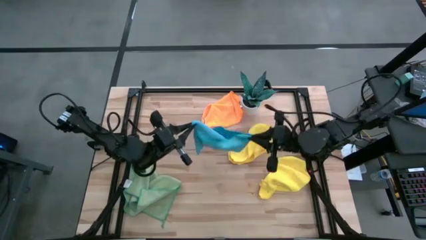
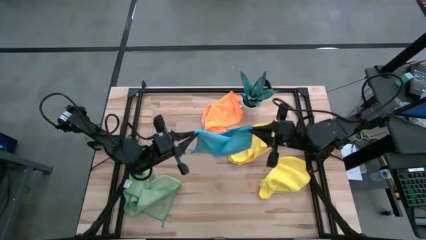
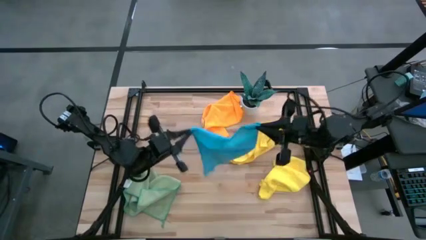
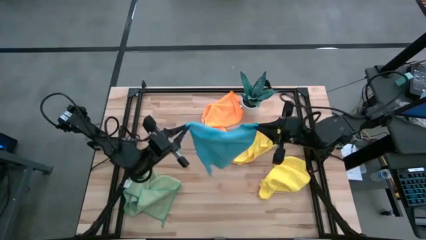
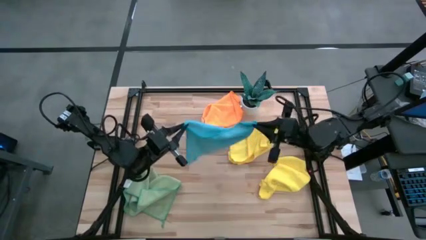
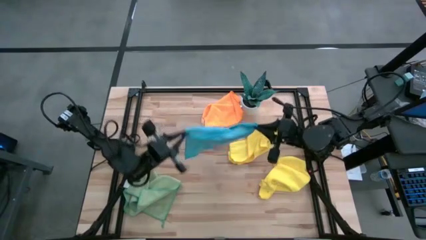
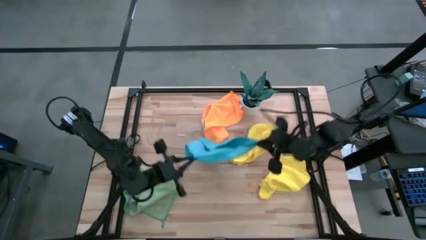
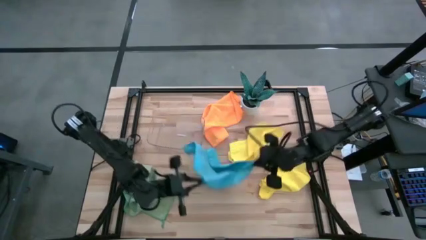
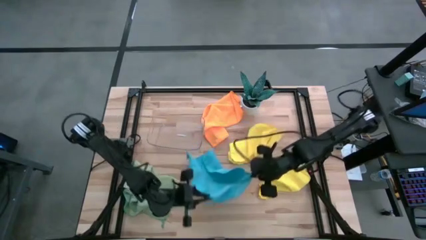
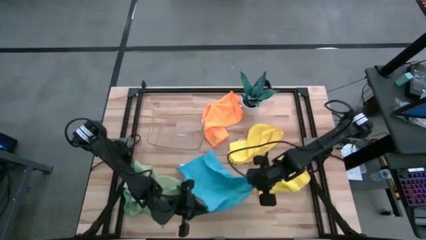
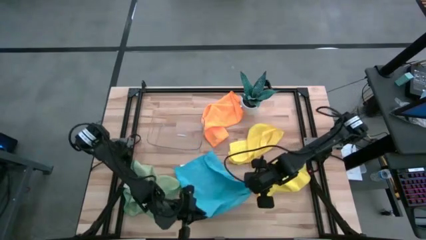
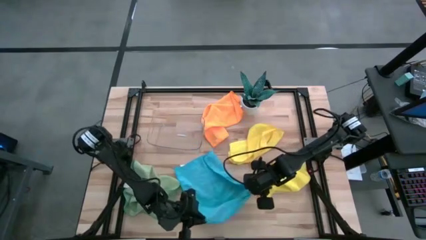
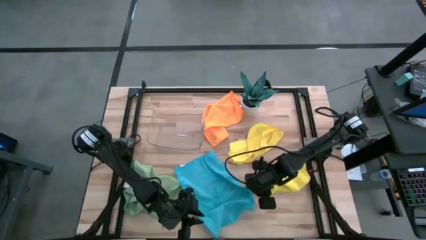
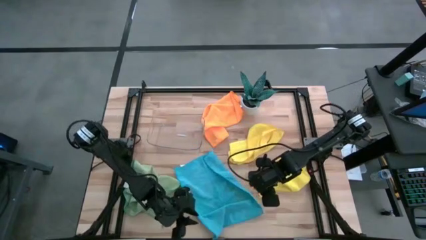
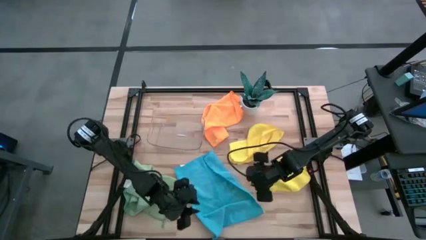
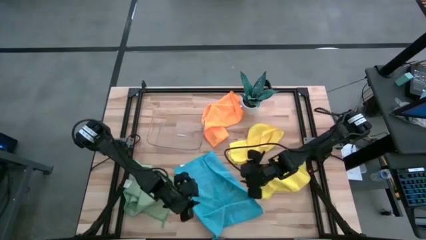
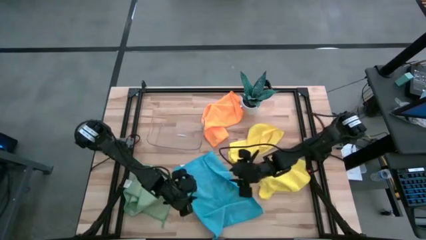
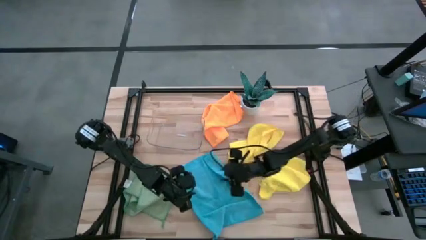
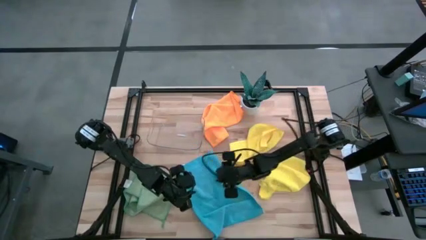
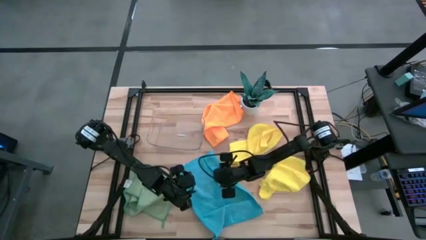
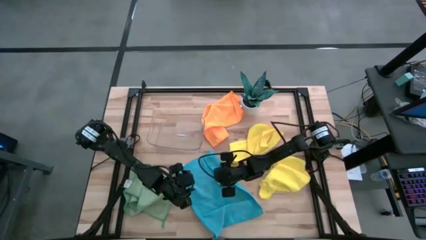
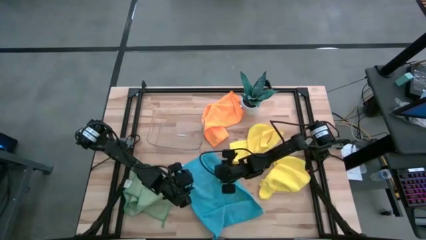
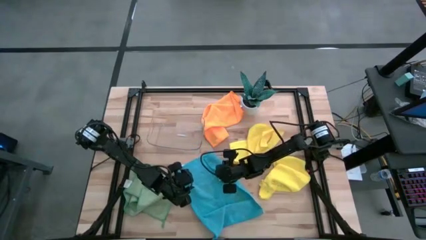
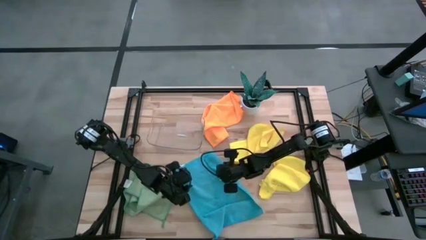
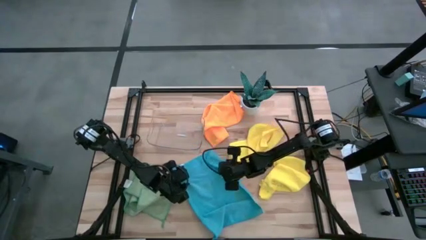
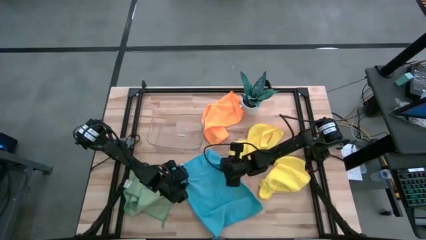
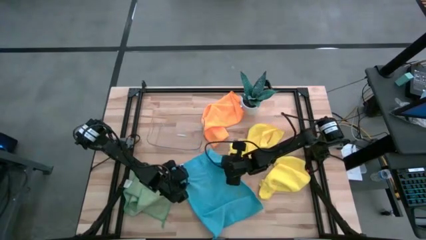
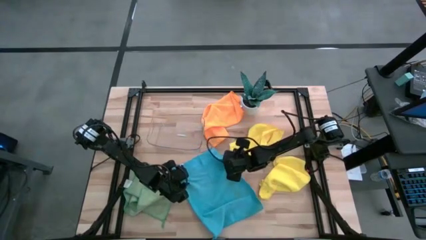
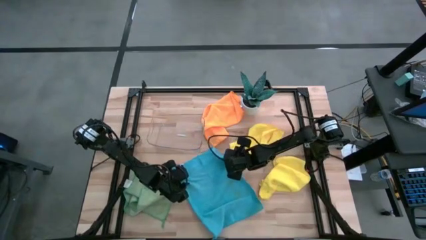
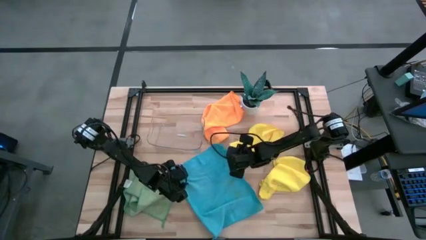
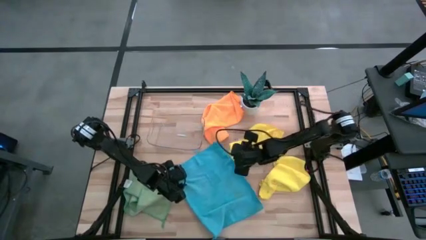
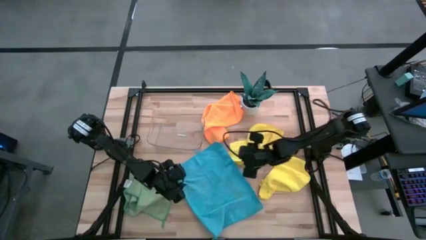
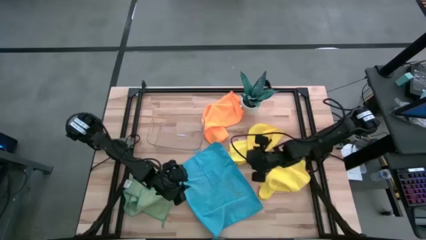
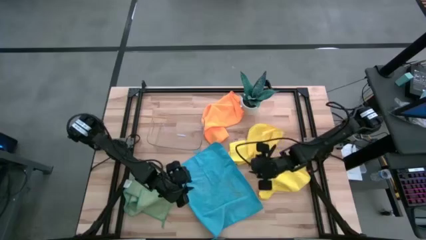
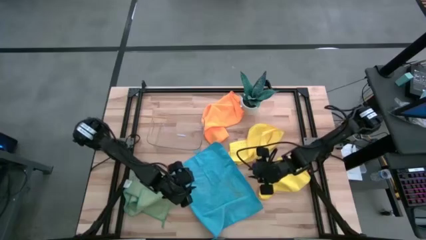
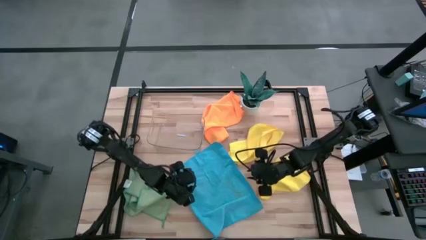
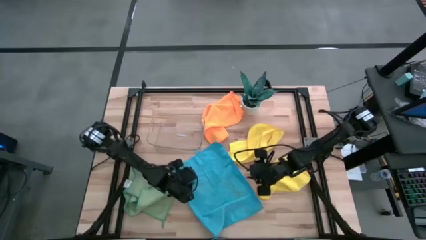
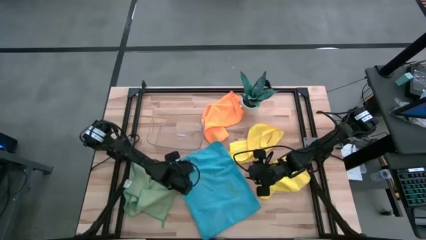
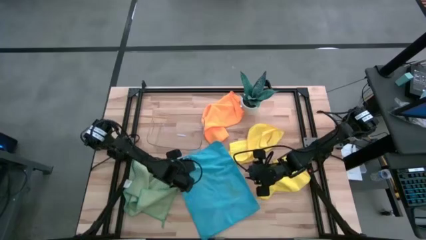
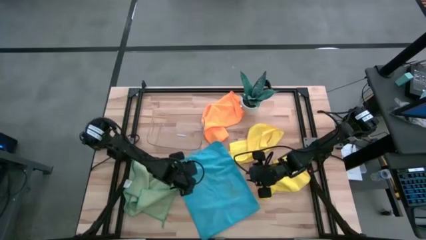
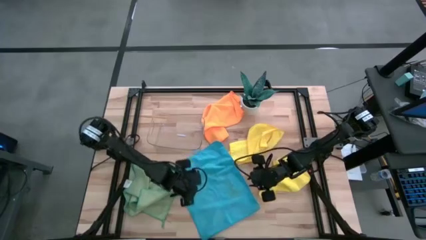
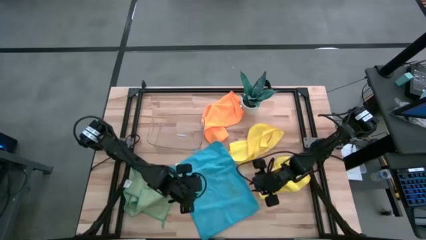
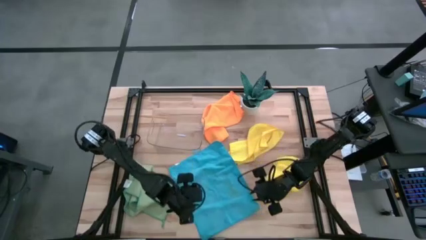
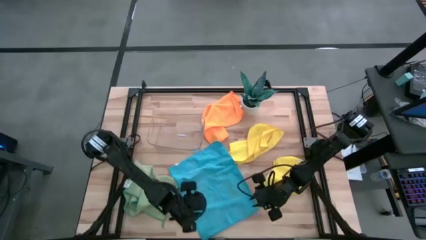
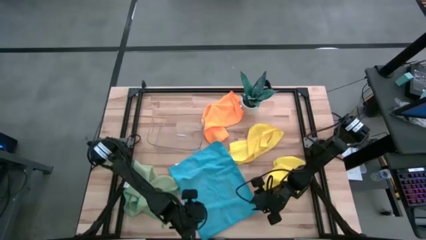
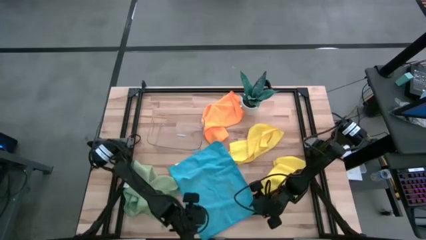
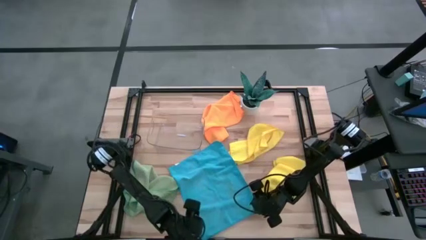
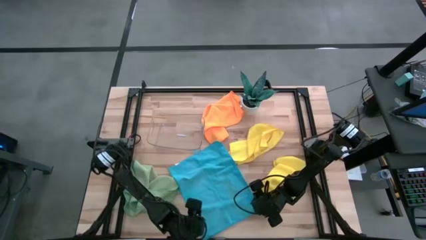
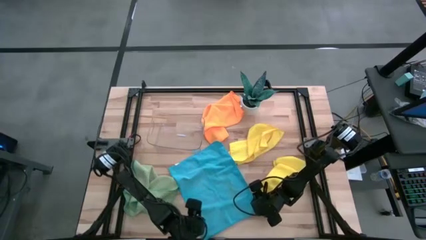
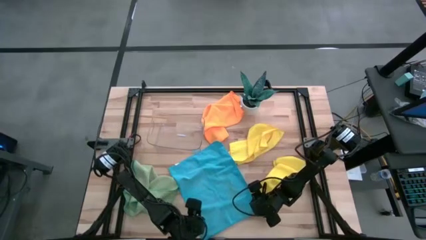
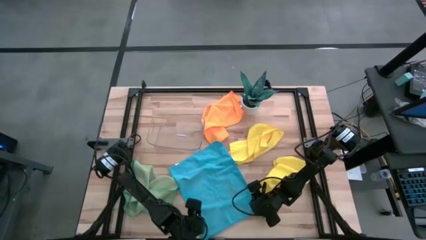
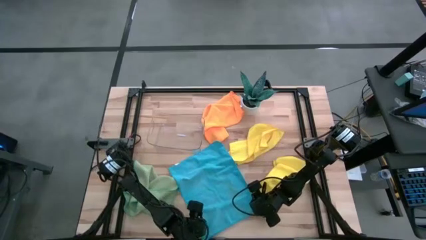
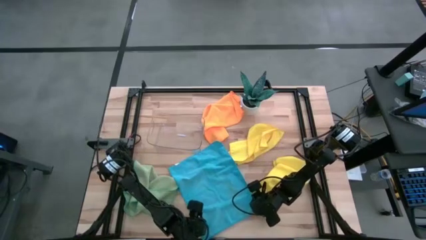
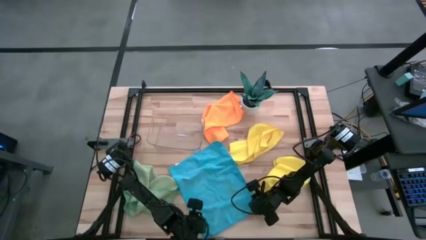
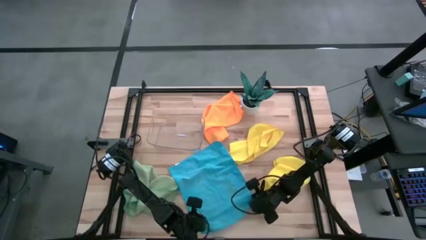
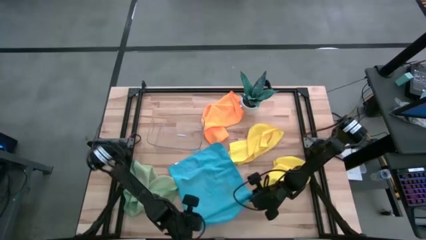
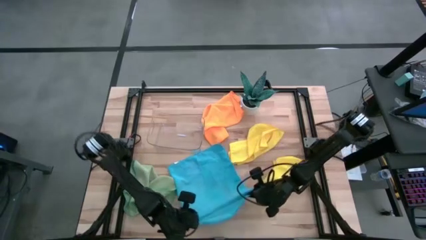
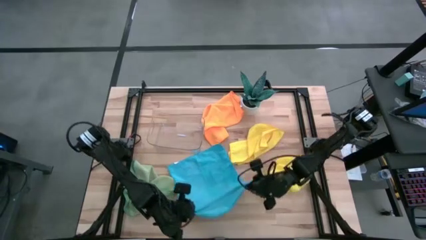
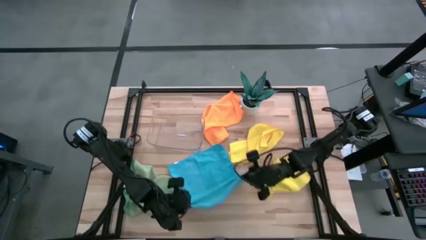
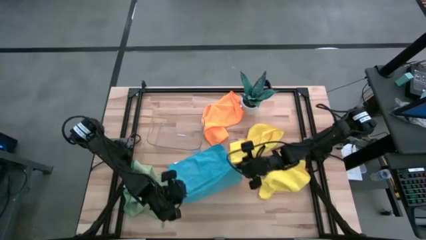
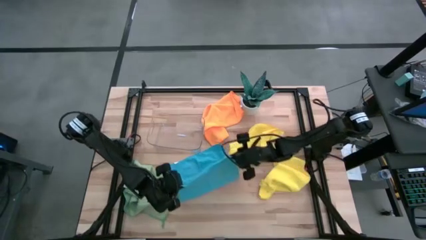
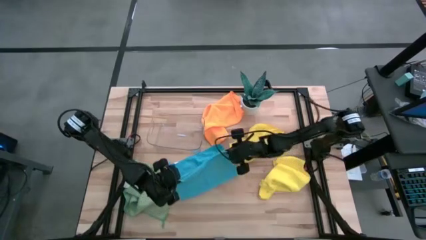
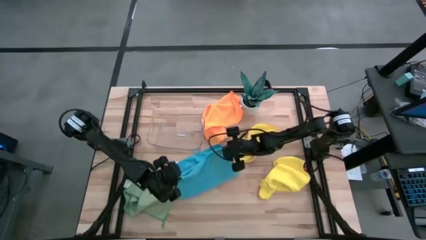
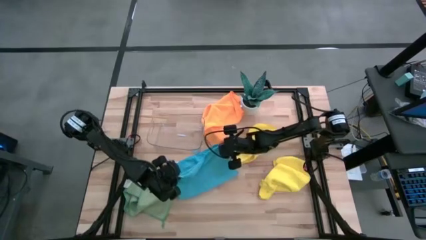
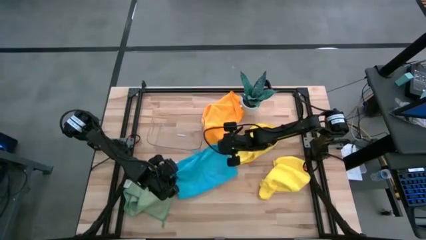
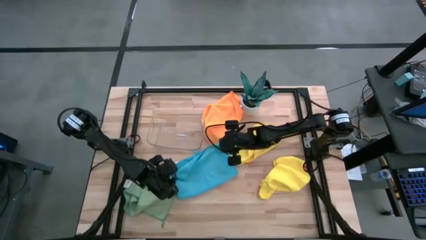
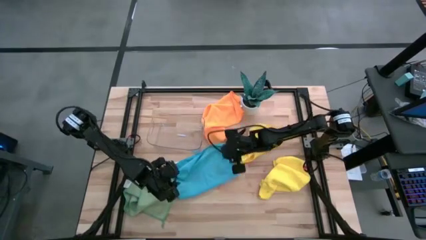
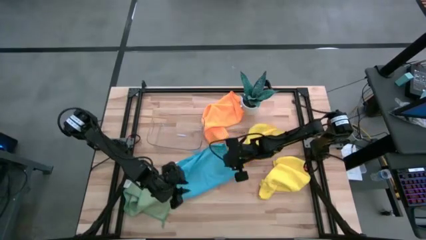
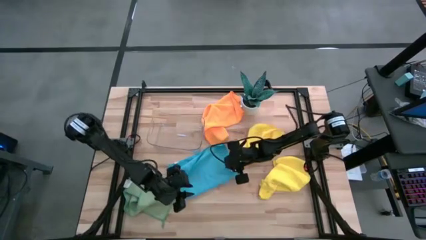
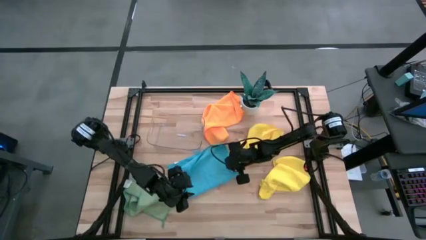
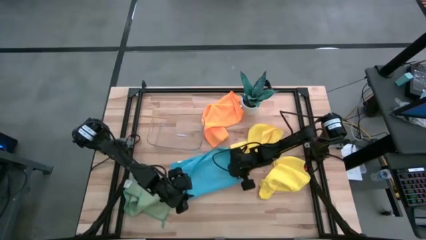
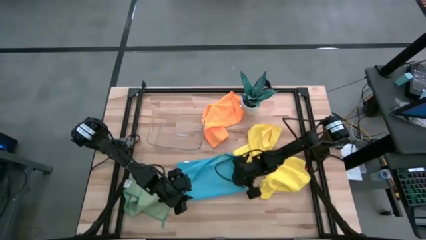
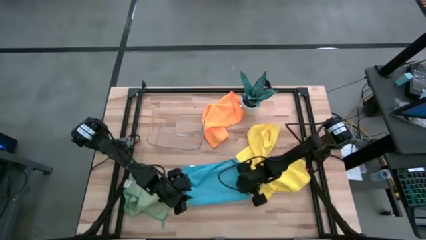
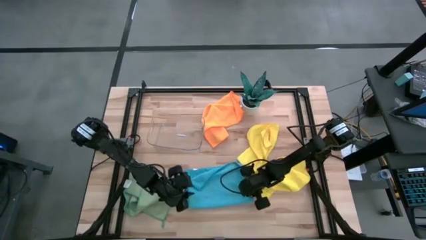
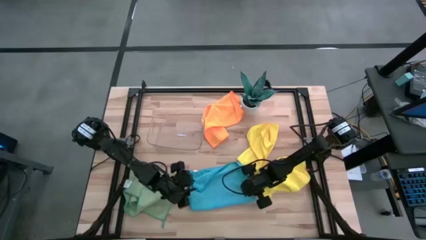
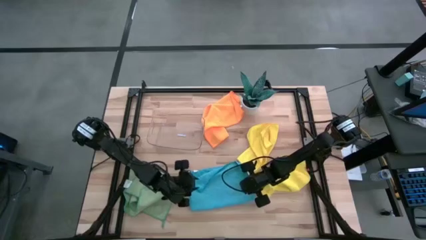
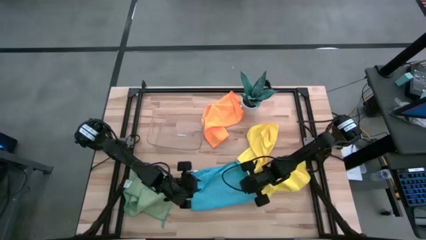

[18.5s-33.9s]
Task: Fold microfiber towels
Fold the blue microfiber cloth
